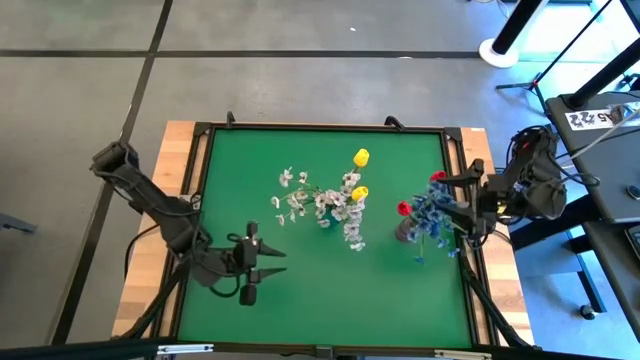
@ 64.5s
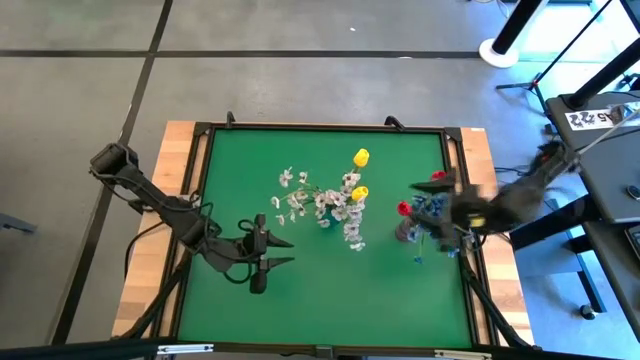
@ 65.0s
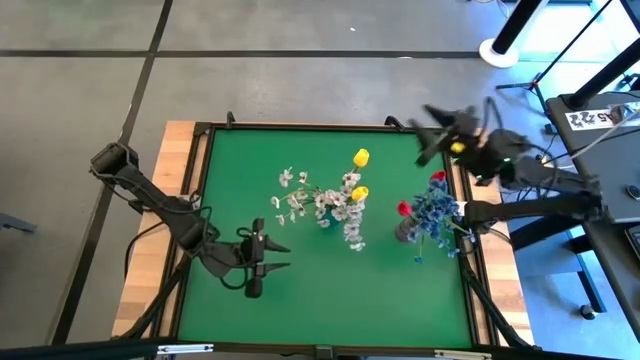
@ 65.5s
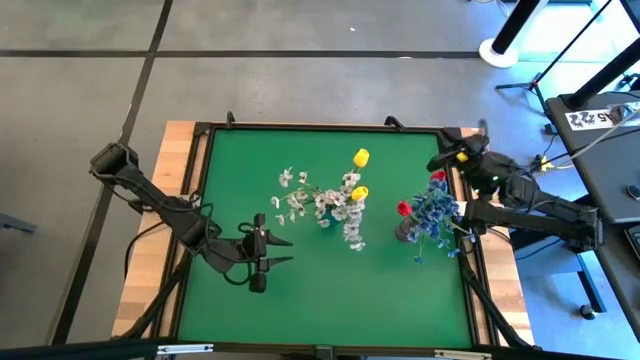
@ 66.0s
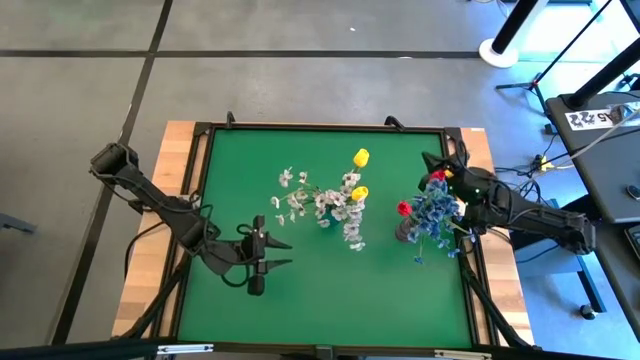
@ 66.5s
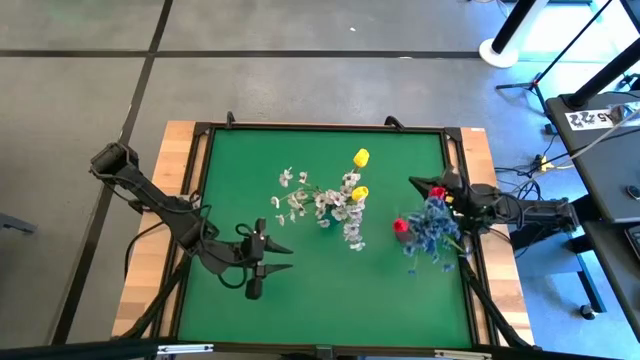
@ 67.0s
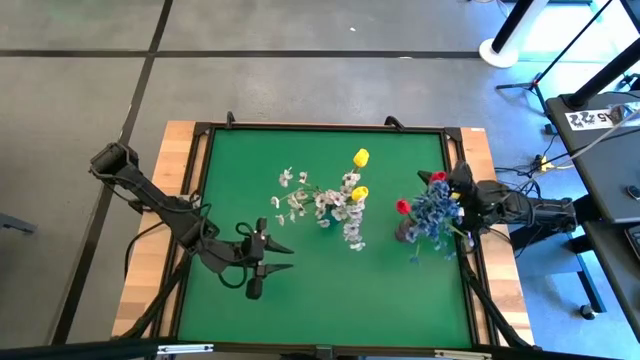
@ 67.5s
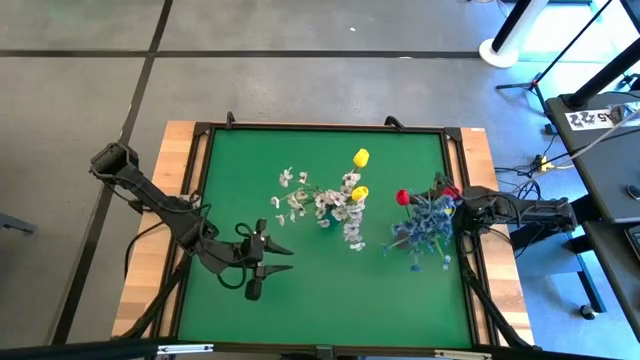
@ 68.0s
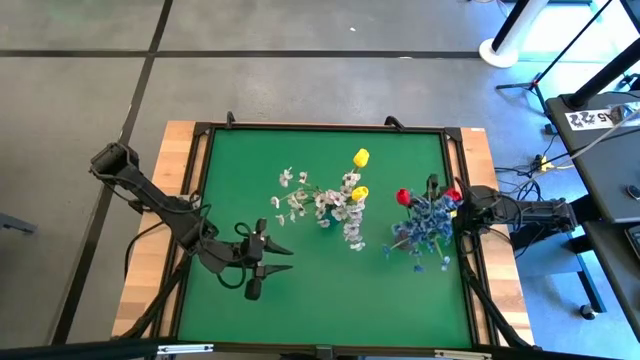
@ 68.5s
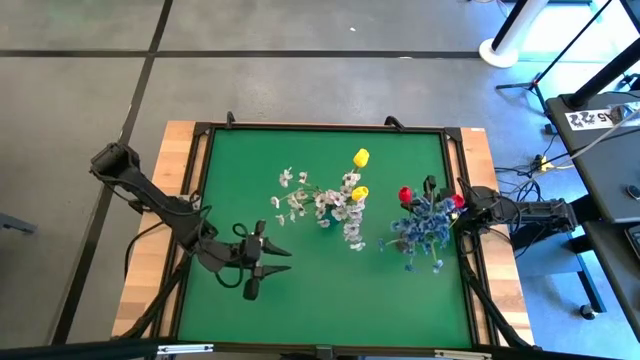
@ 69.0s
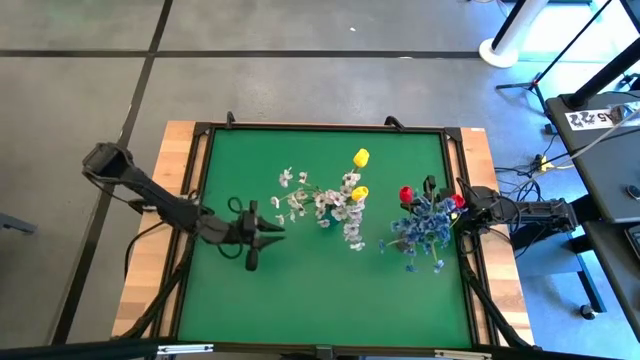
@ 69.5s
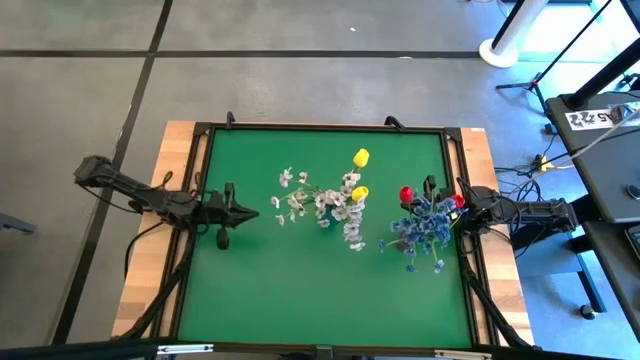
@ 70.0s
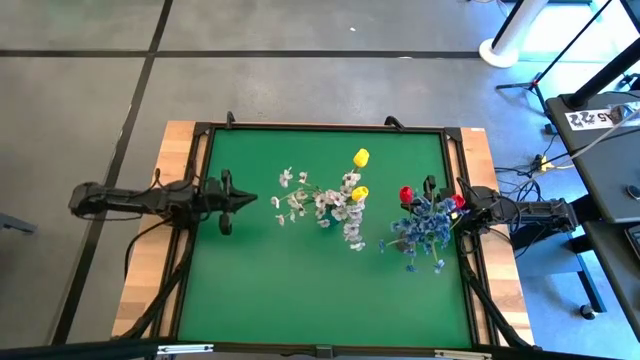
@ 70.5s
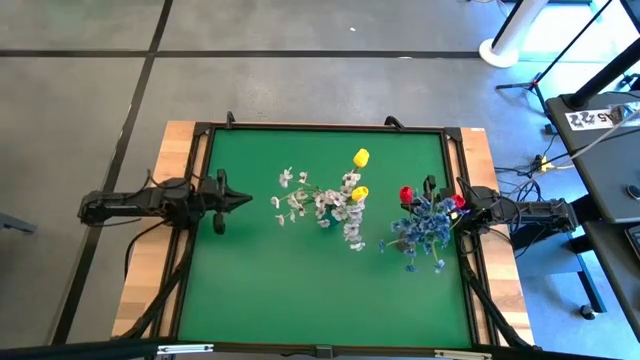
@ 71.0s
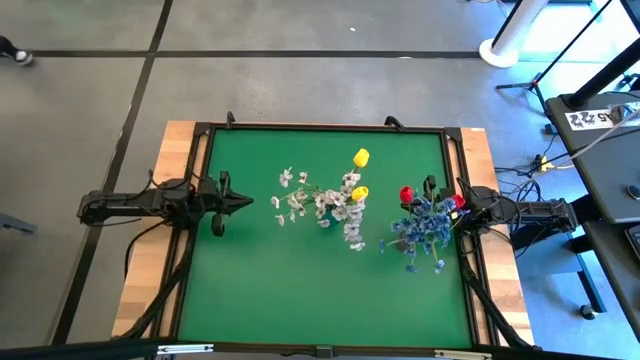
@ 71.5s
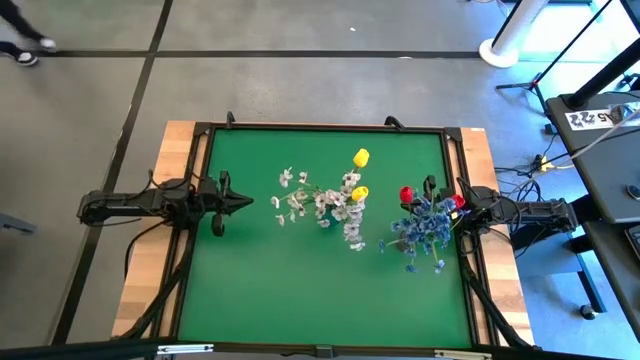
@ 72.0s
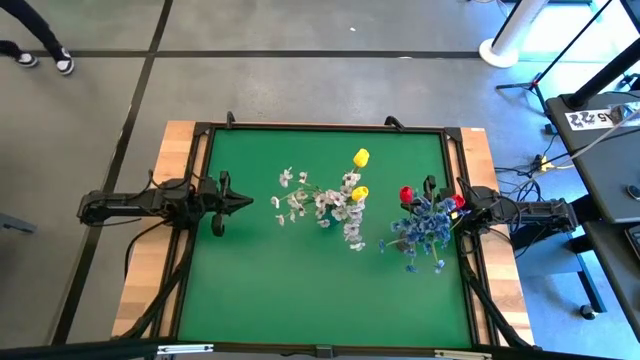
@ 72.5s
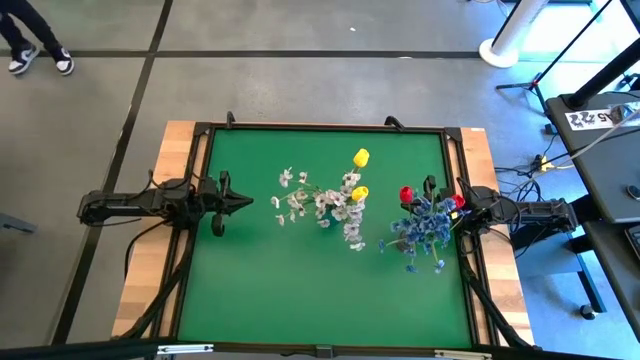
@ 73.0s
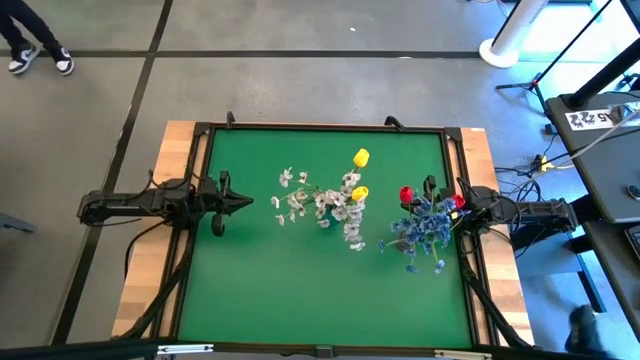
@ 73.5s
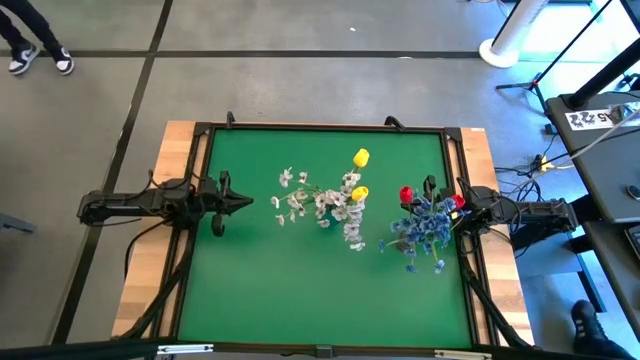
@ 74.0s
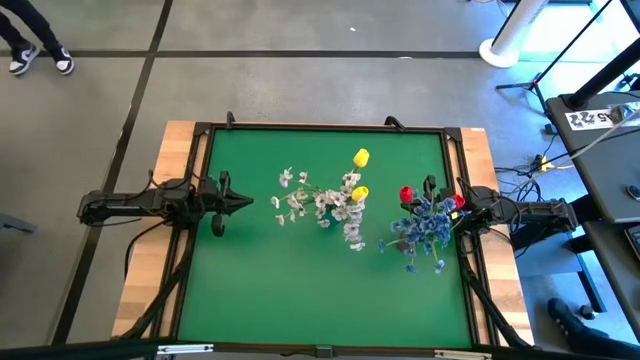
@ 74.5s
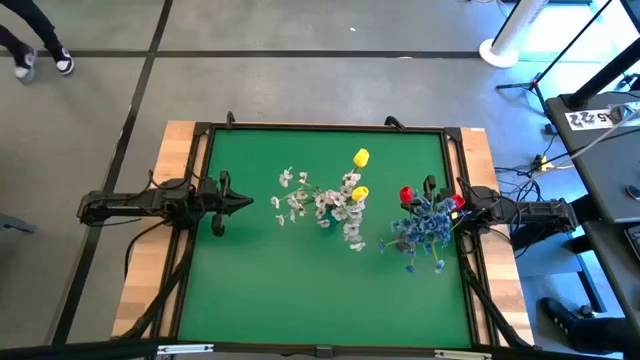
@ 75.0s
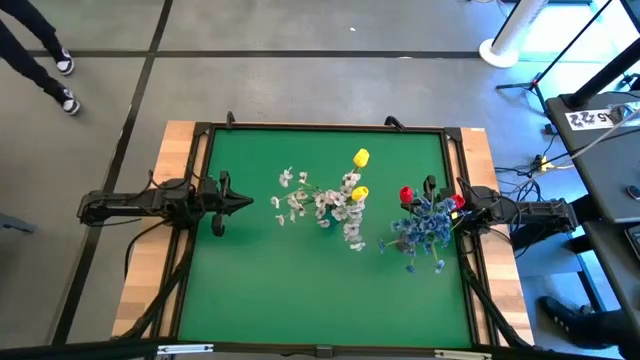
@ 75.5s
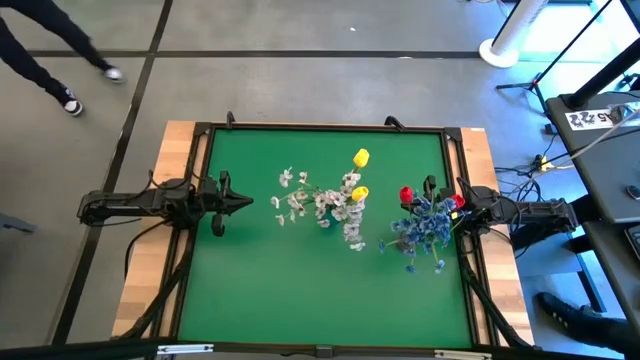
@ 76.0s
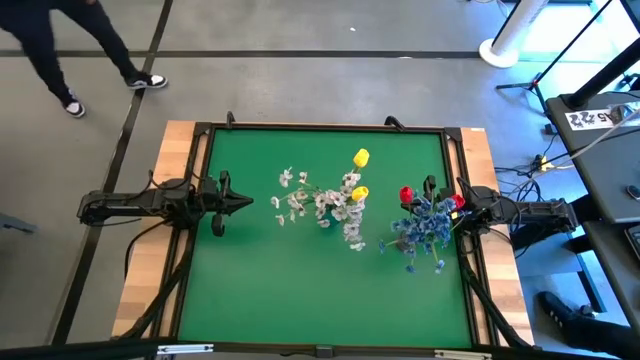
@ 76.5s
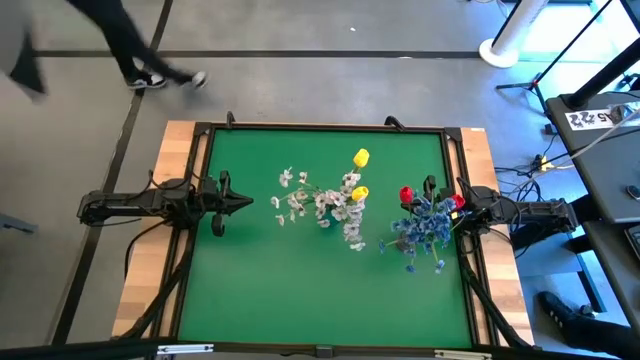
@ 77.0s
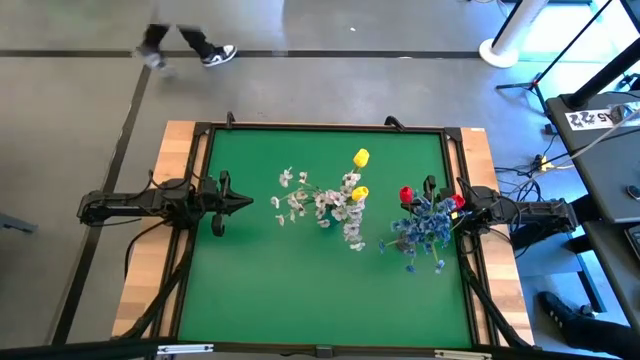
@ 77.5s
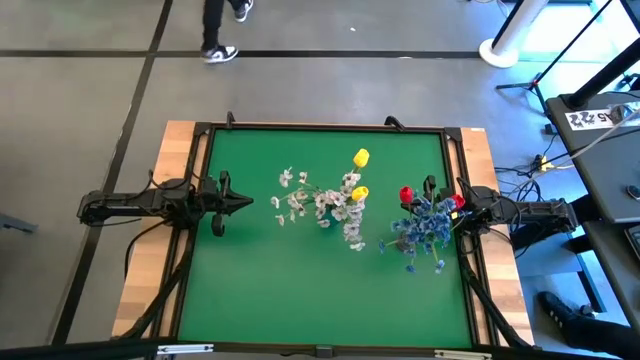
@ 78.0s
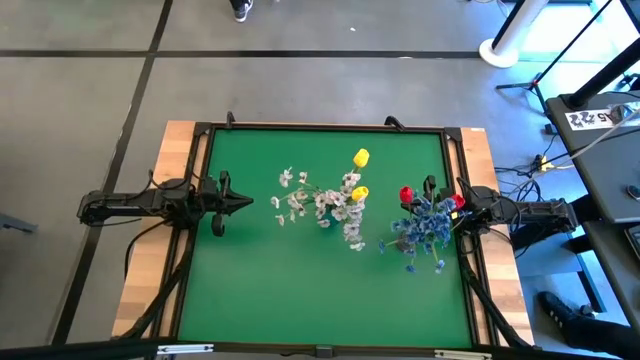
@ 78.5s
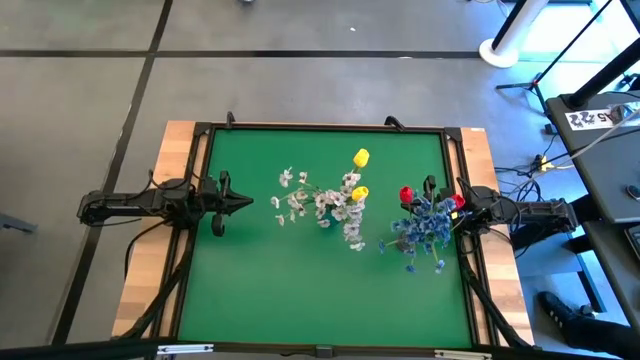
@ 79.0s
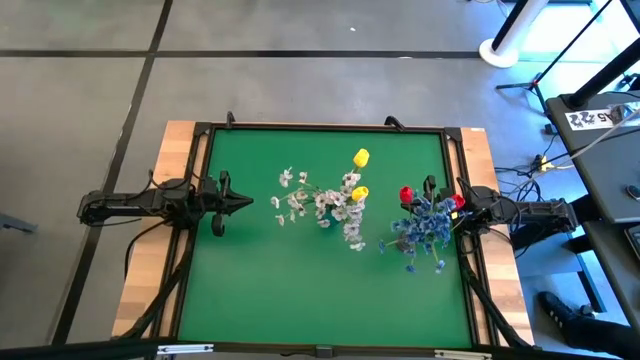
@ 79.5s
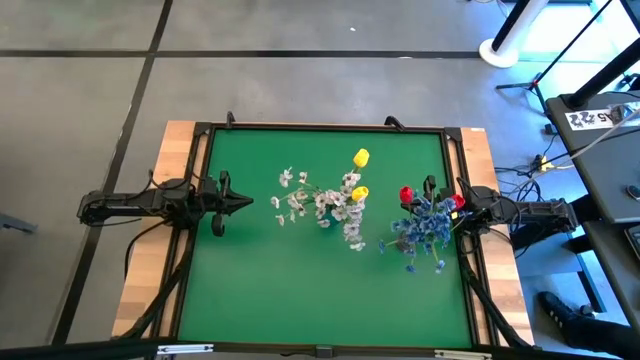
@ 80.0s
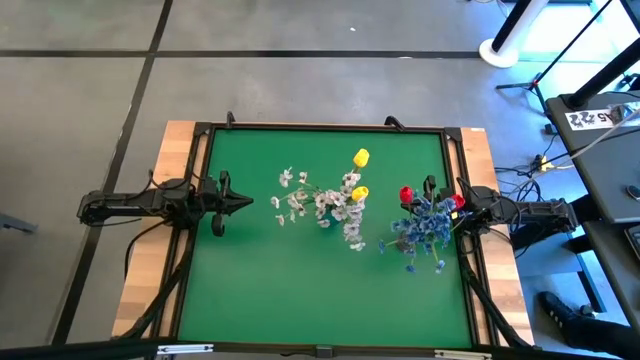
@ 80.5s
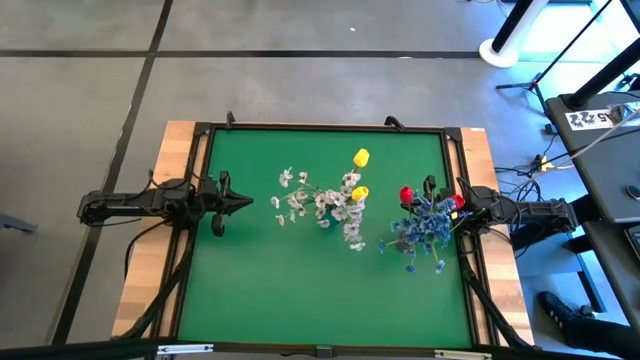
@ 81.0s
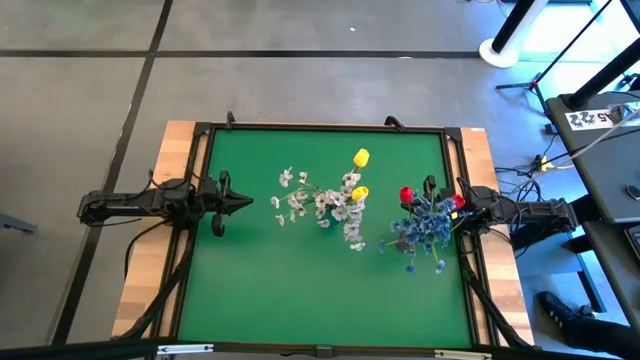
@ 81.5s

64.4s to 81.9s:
Task: Sort flowers into vase by color
Return to Home Position

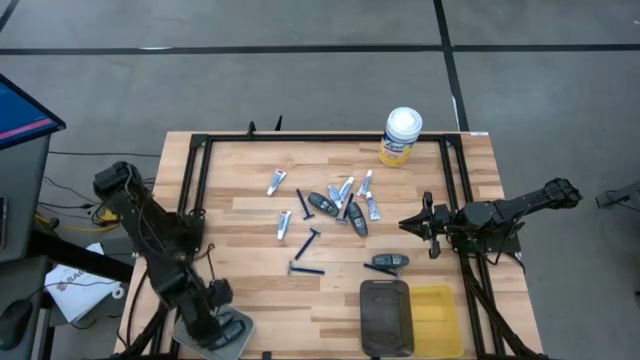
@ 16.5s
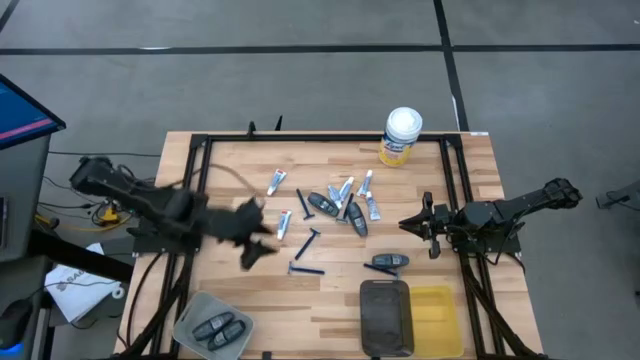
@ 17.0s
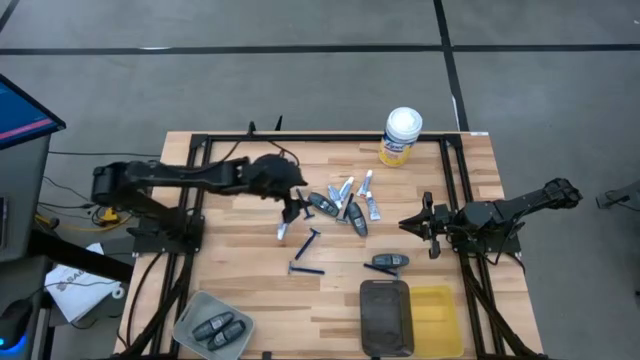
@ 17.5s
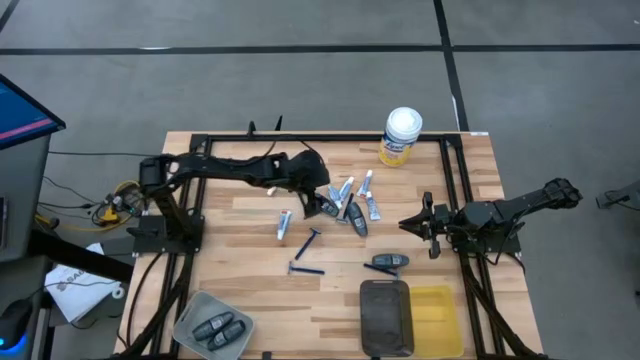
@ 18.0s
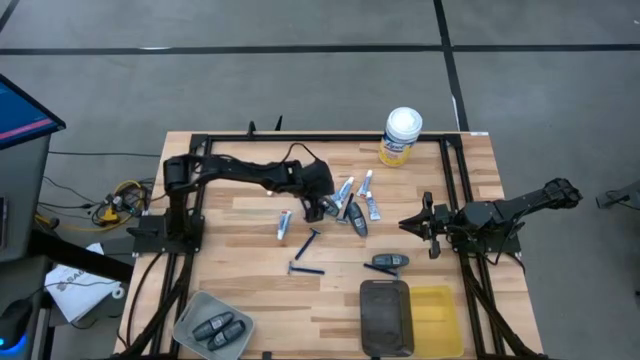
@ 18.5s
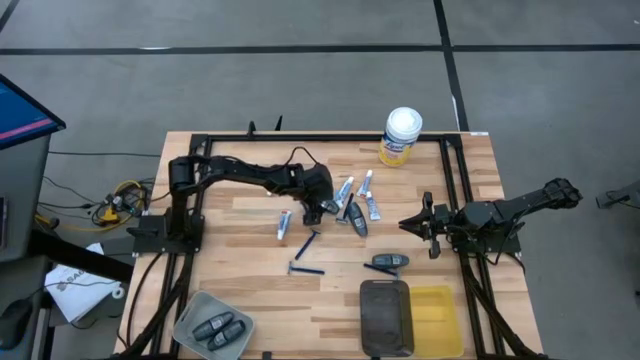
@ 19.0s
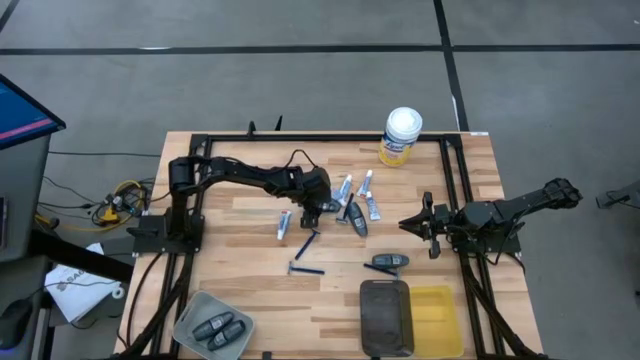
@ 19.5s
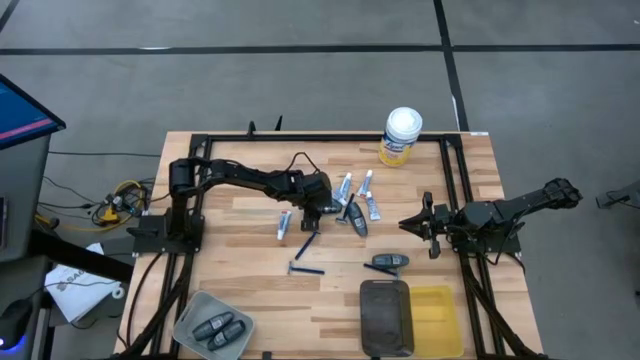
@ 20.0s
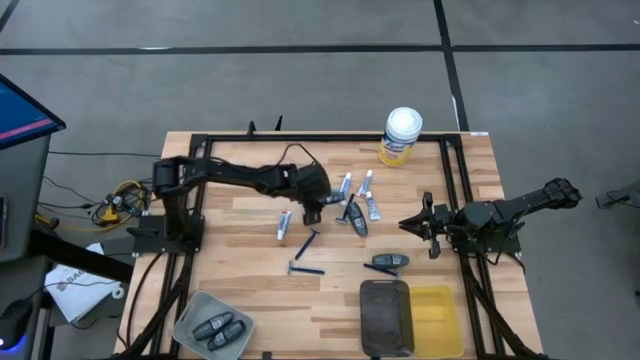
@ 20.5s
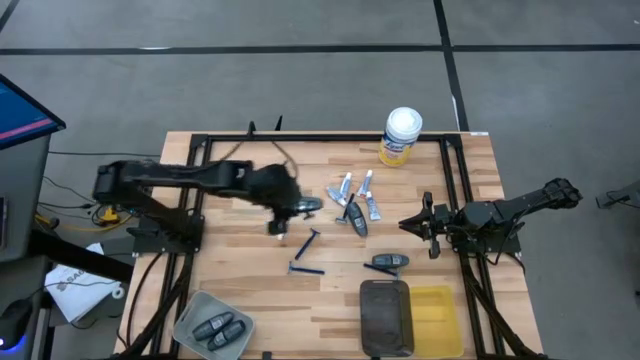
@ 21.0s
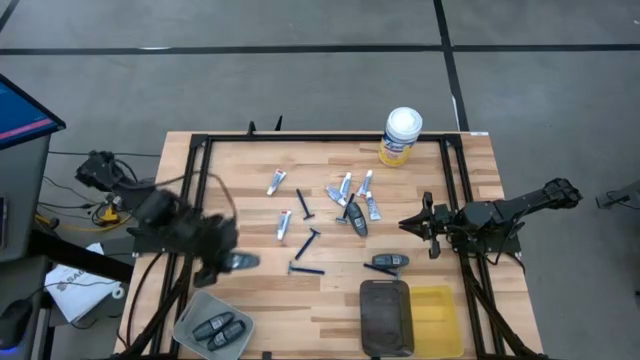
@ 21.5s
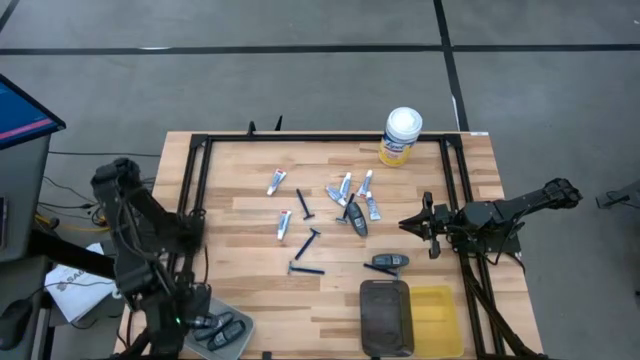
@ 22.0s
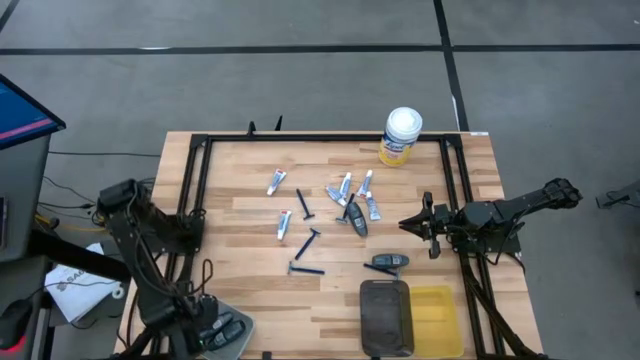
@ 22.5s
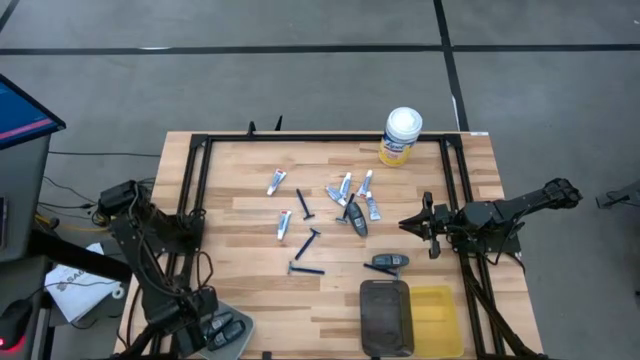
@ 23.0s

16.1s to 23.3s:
Task: Pick & Place Travel size toiletries
Put the deodorant into the gray bin
